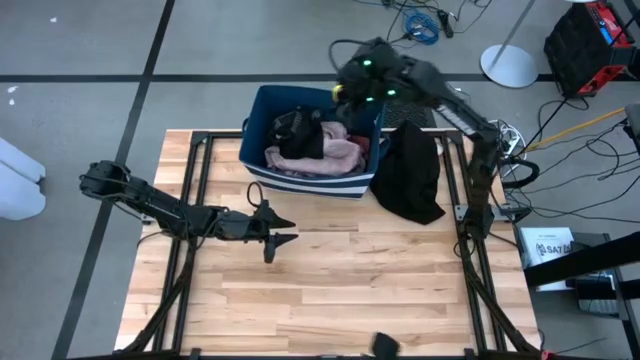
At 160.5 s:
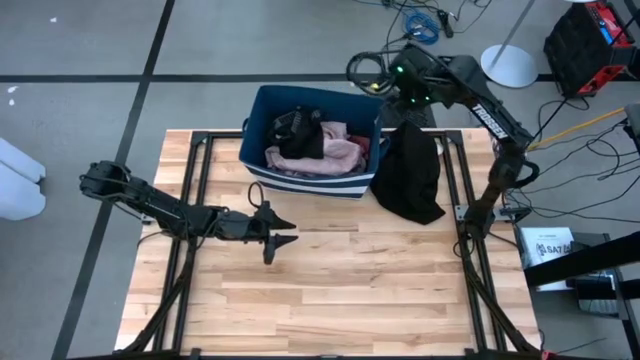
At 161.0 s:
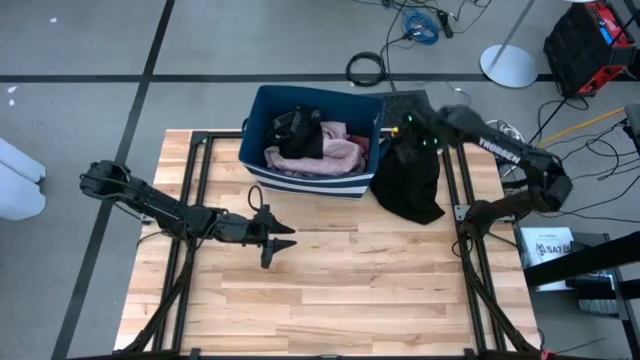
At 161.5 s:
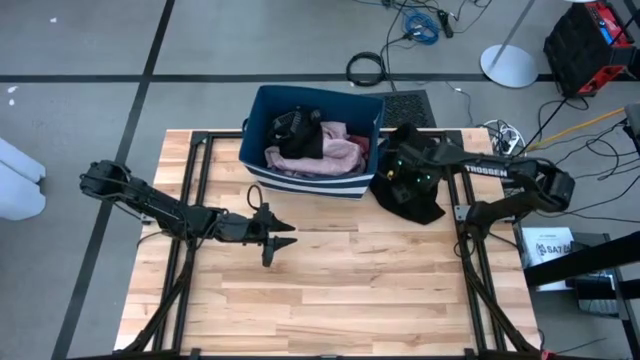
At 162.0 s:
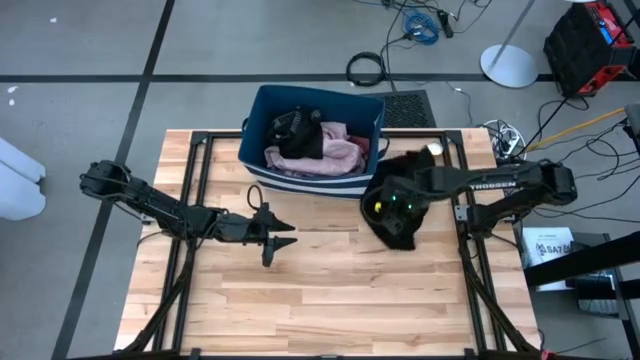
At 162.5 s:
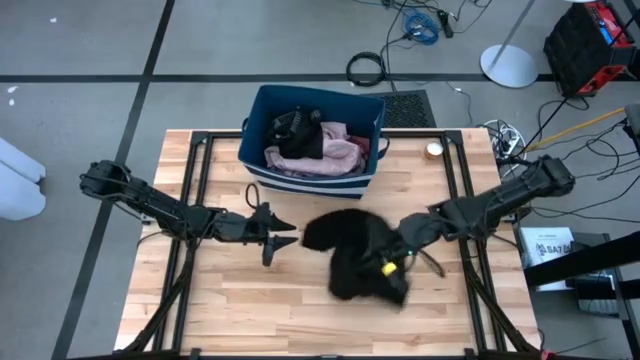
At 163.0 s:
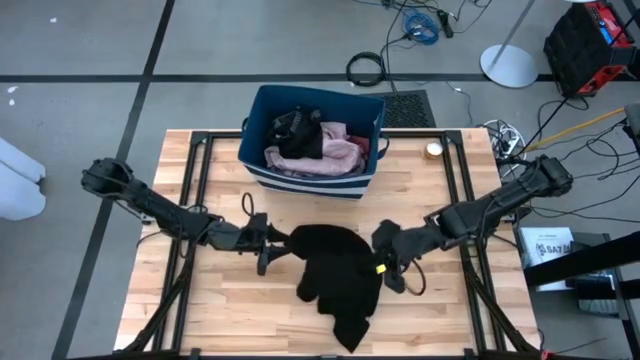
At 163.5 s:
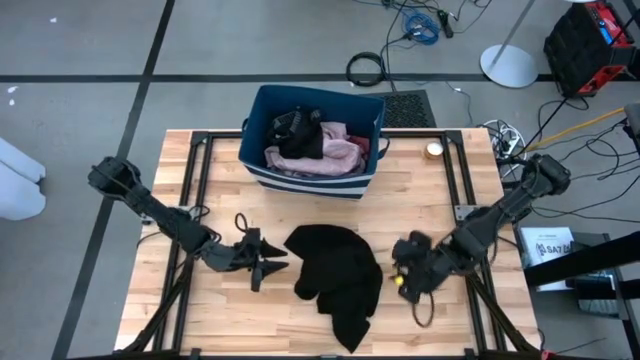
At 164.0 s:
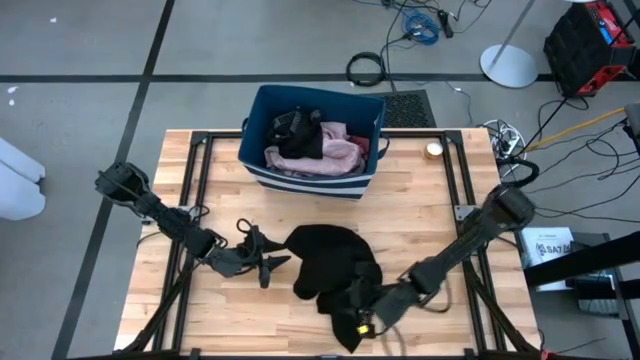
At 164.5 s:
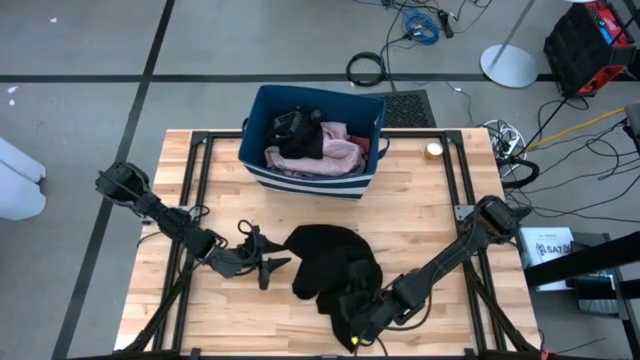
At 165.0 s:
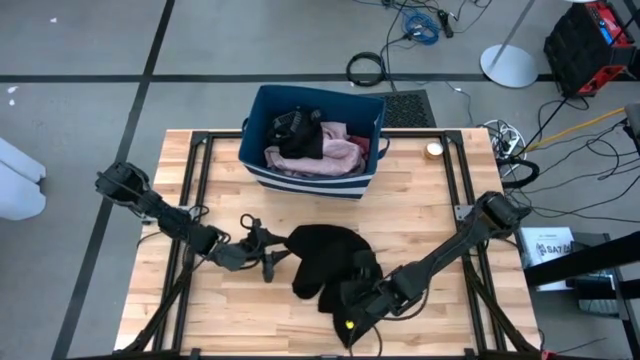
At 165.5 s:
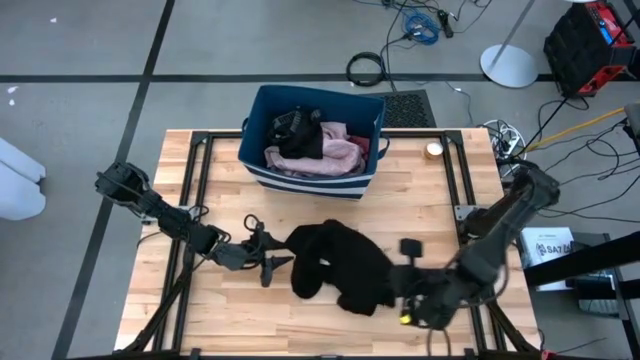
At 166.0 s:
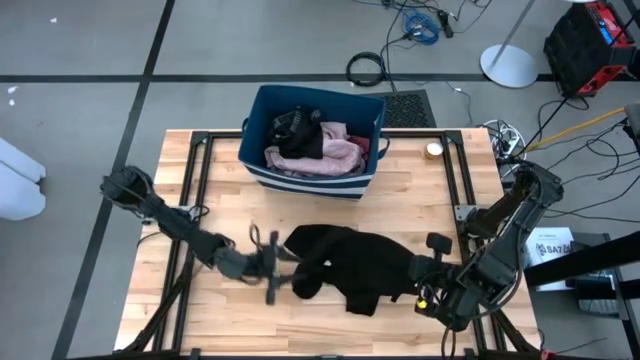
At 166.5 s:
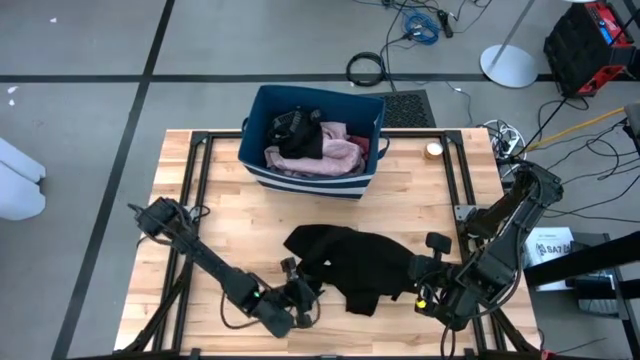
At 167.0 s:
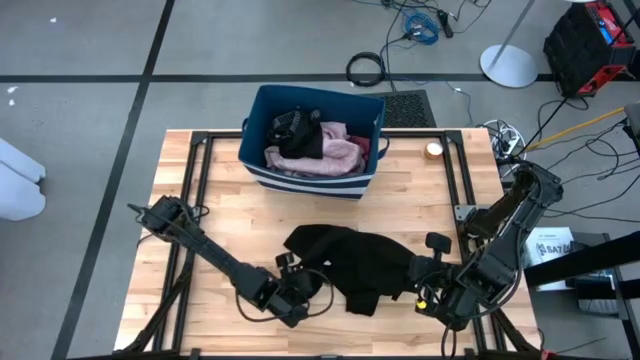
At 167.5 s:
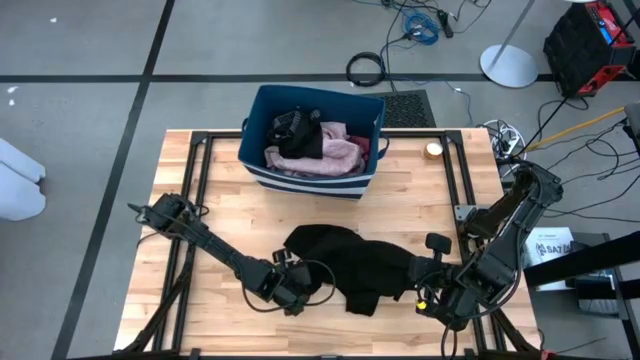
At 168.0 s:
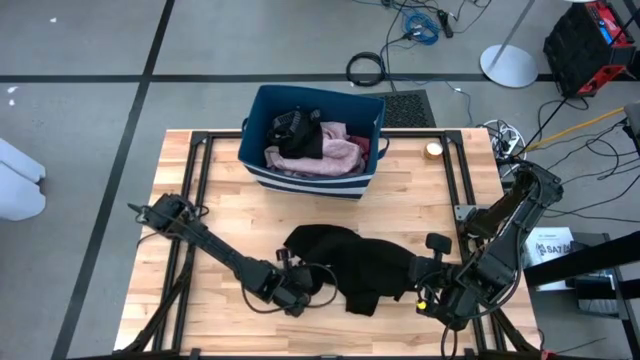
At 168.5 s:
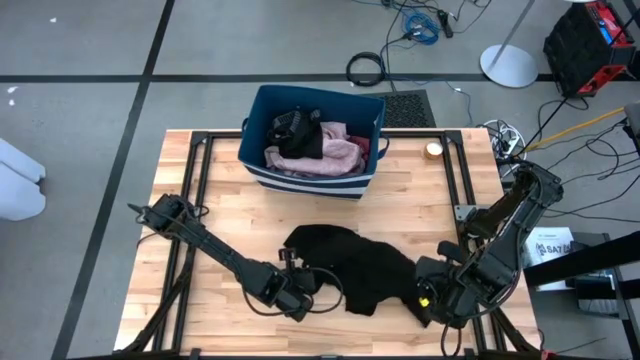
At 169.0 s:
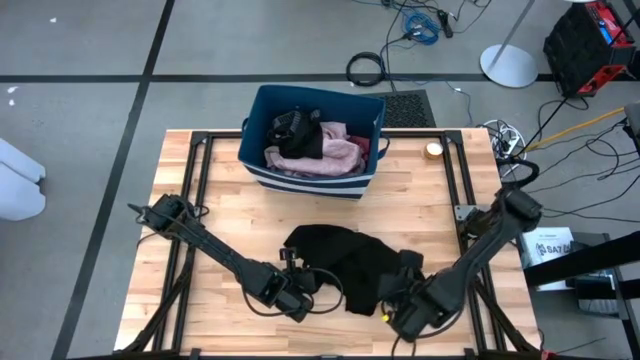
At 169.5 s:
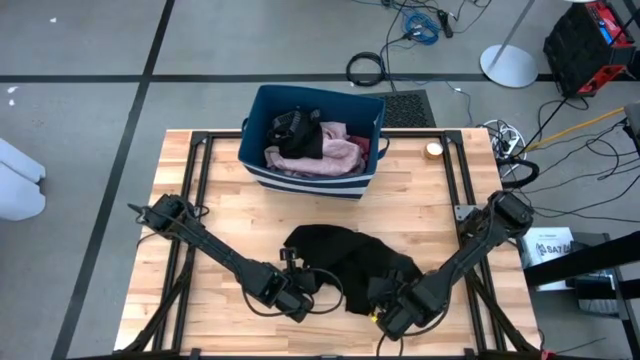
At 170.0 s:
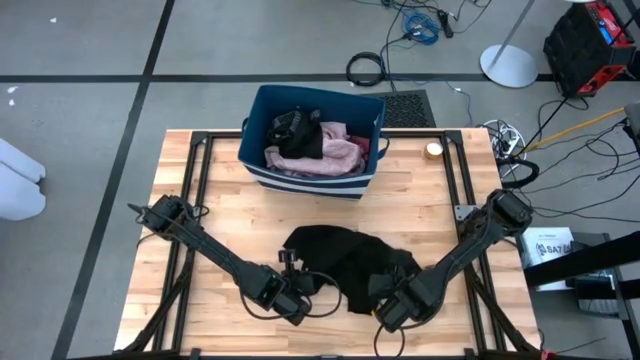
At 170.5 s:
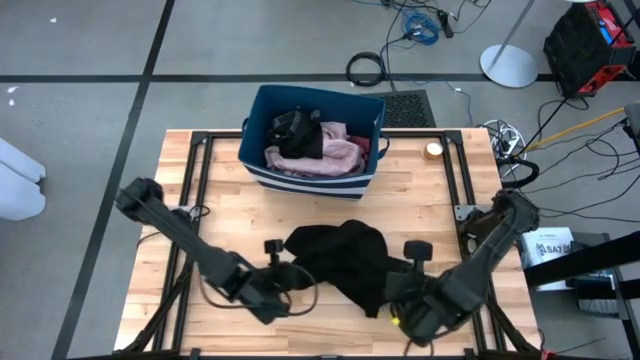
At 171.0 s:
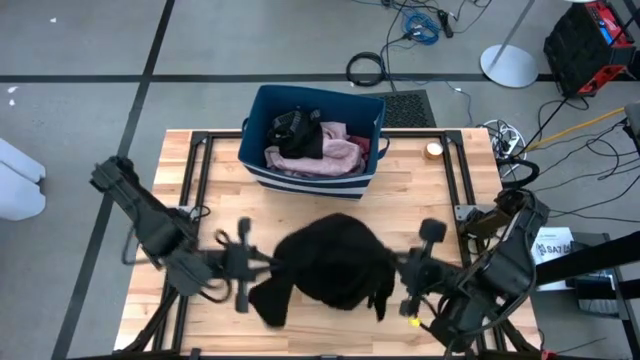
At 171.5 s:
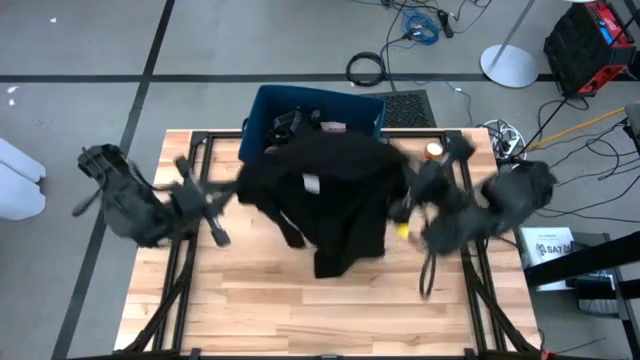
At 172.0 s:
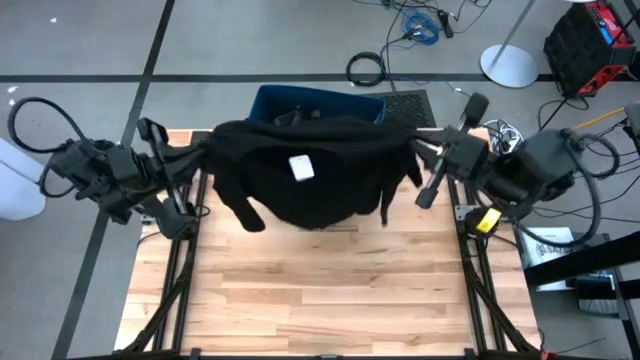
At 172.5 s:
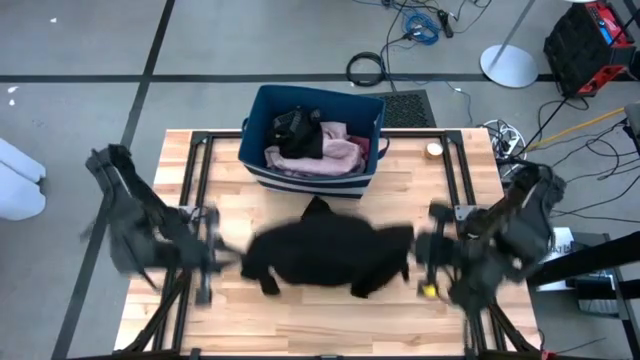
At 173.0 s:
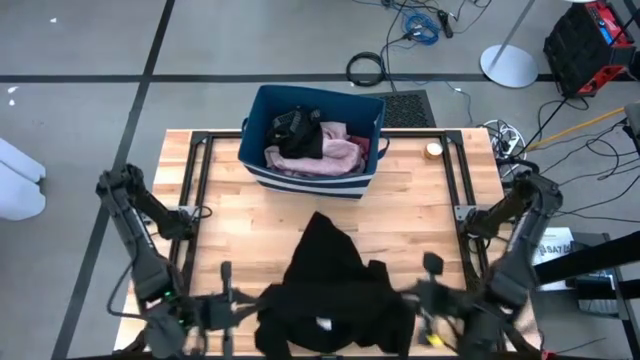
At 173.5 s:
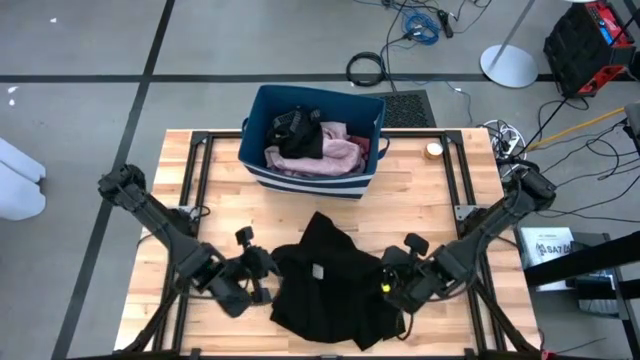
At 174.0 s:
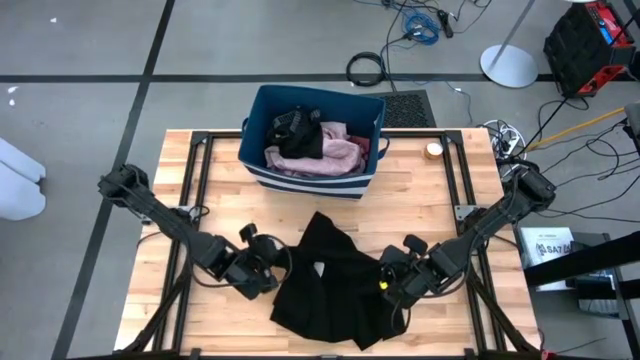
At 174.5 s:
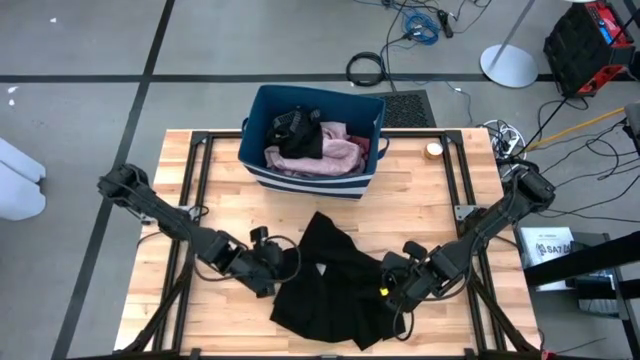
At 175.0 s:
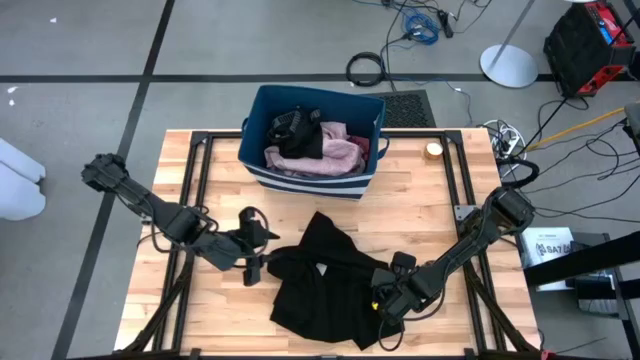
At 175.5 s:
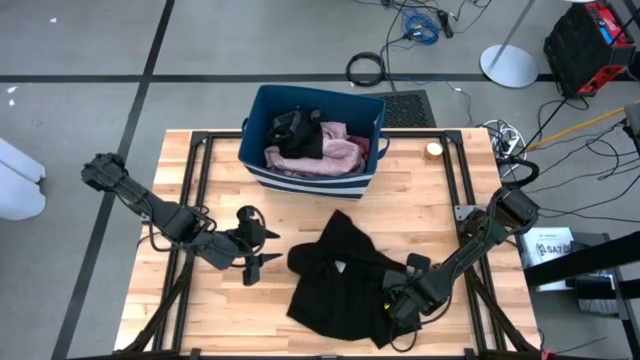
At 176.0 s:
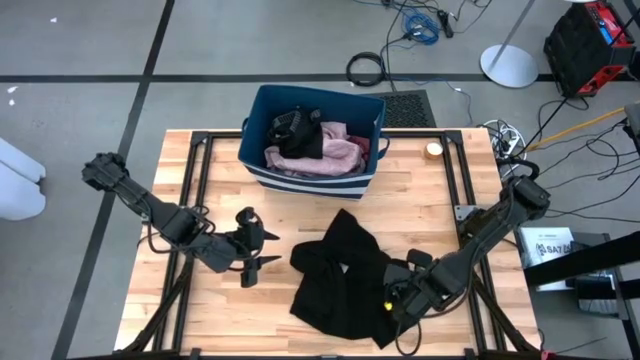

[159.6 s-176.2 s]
Task: Sort clothes
Put the black hoodie into the blue laundry organizer

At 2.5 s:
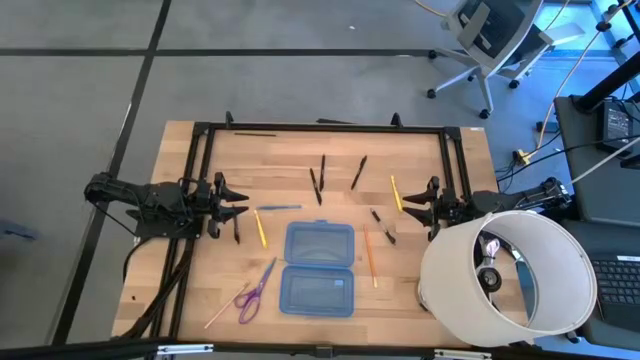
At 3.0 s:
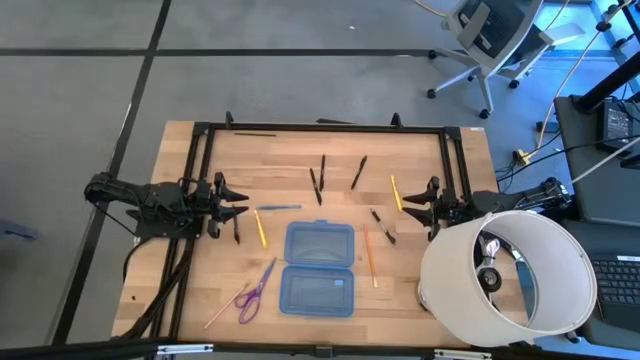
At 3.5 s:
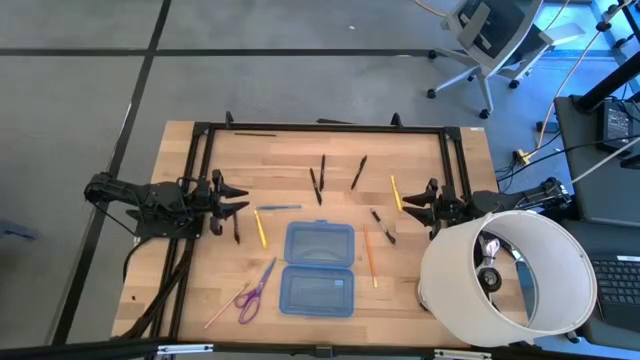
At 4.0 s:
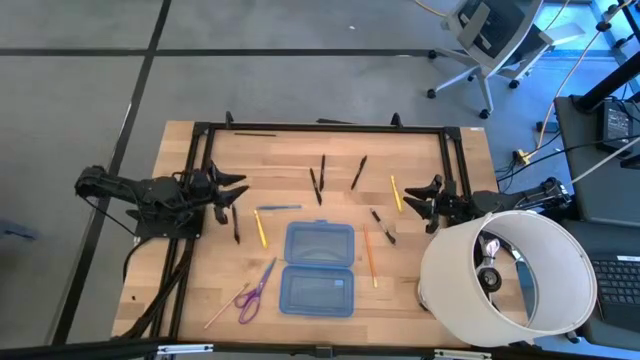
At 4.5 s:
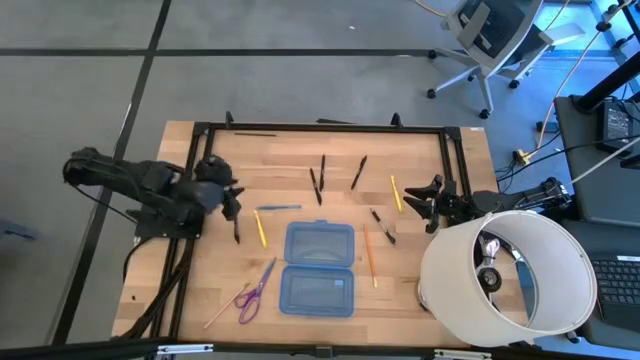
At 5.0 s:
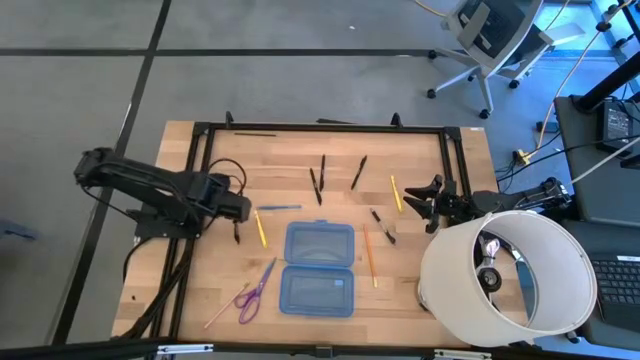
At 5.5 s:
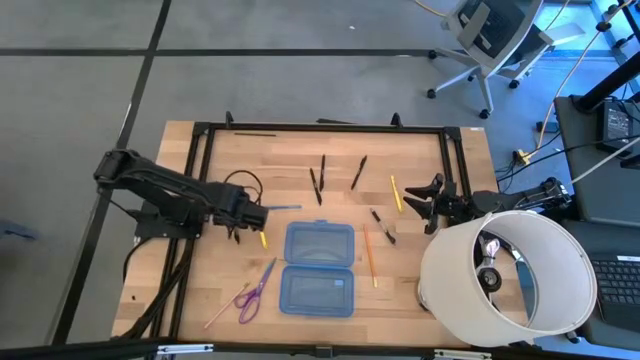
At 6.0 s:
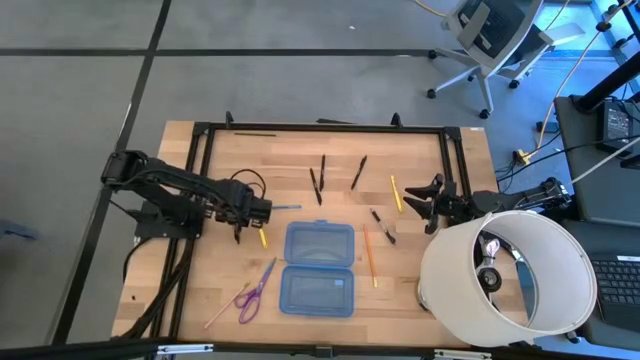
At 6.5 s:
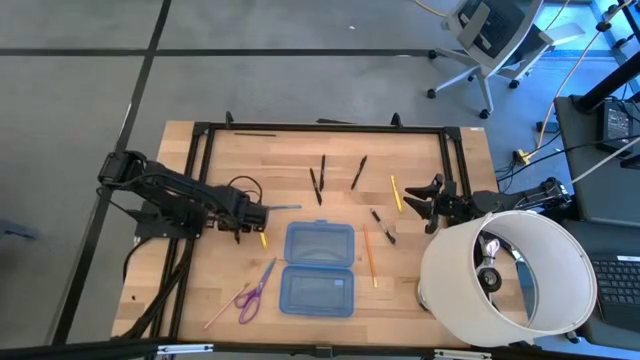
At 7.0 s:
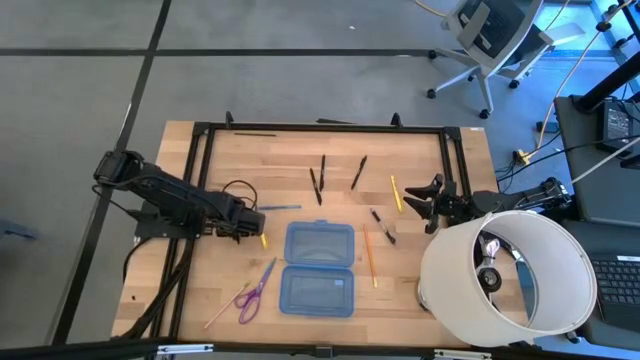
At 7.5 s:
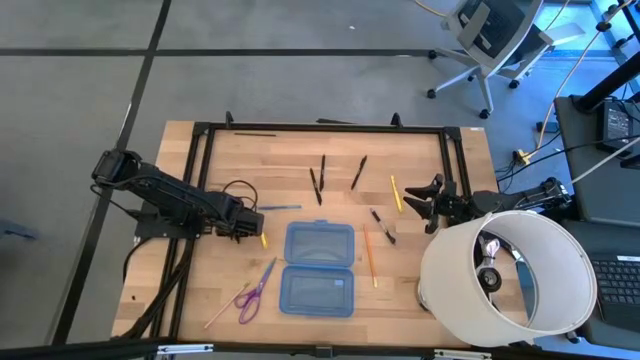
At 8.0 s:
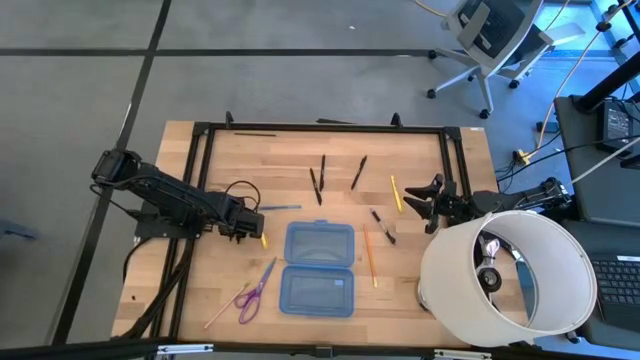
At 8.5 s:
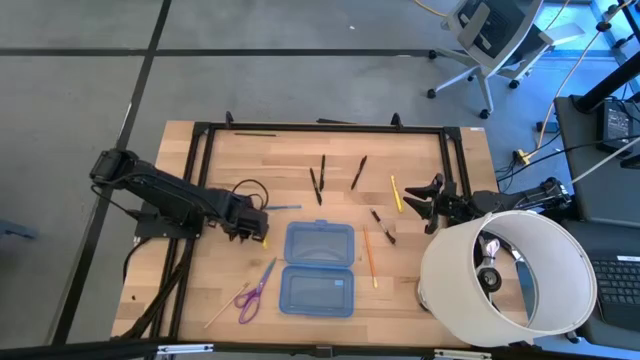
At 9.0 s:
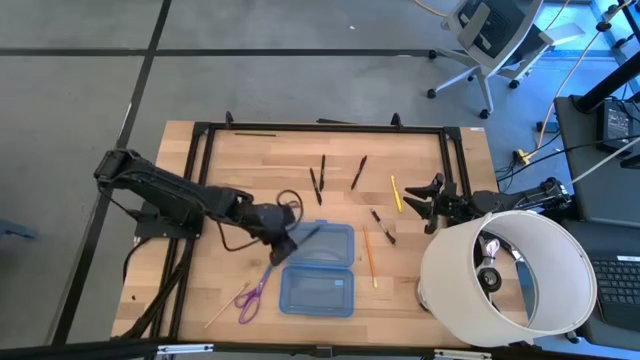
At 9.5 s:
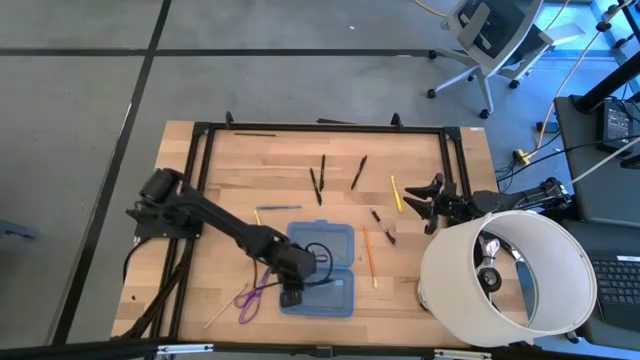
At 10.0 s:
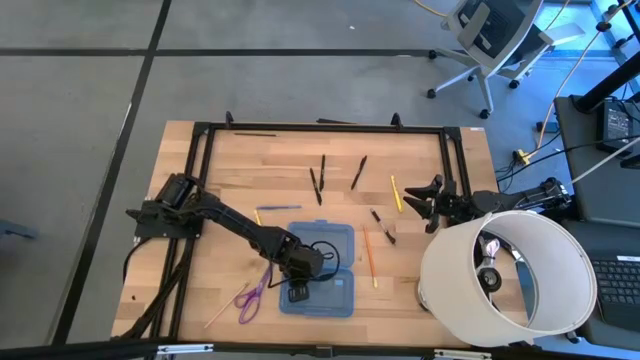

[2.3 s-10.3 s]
Task: Pick & place school supplies into a supply box
Put the black pen into the blue supply box
